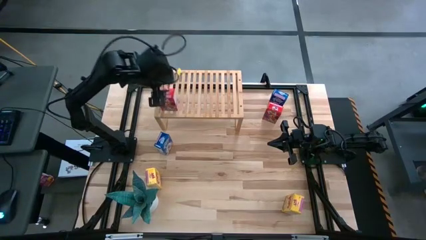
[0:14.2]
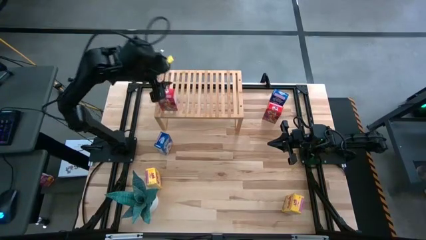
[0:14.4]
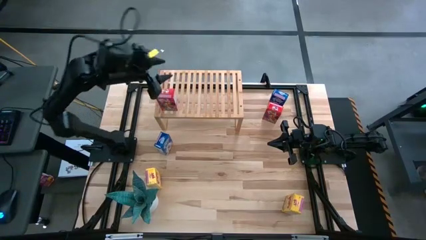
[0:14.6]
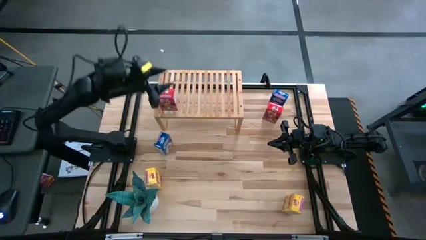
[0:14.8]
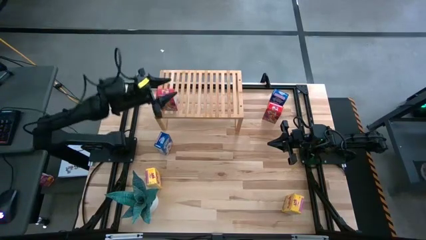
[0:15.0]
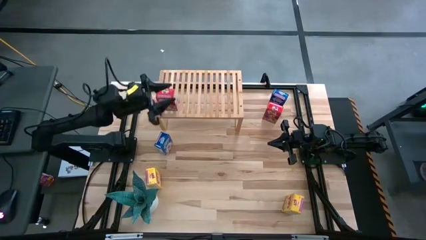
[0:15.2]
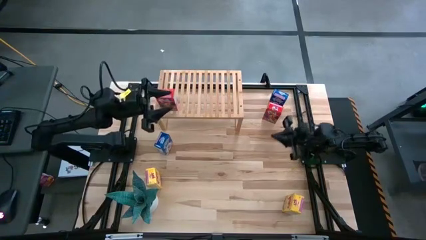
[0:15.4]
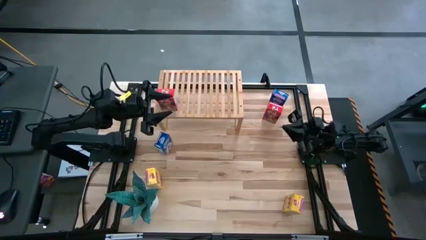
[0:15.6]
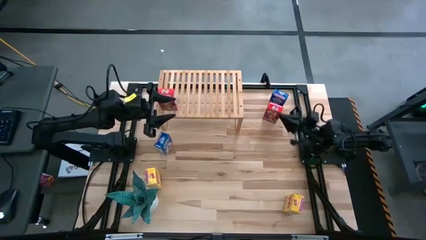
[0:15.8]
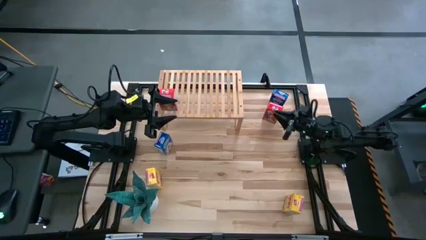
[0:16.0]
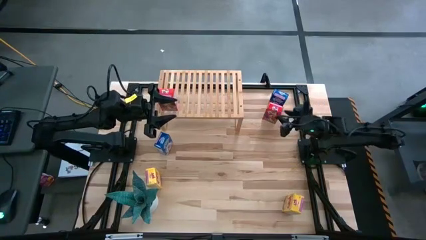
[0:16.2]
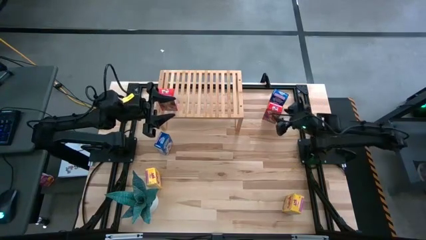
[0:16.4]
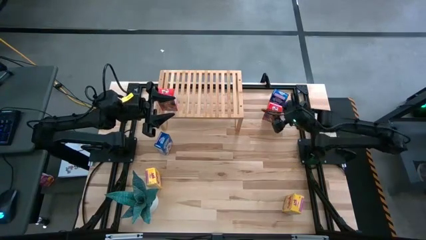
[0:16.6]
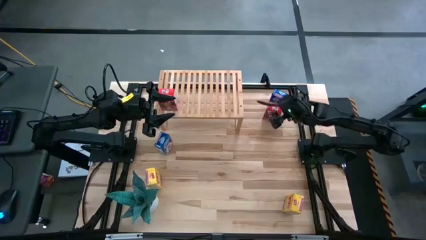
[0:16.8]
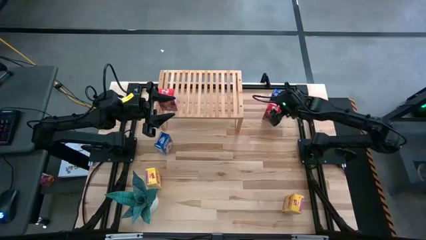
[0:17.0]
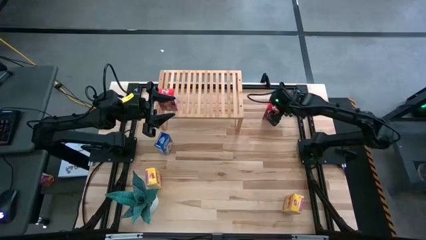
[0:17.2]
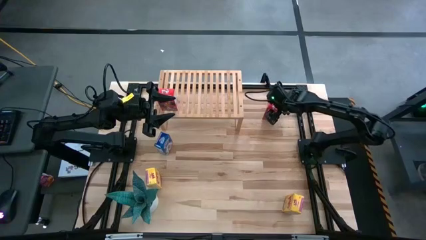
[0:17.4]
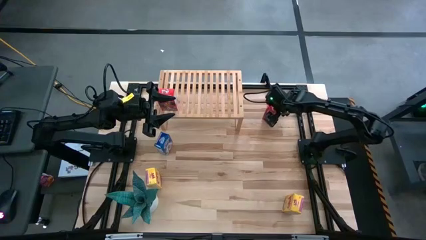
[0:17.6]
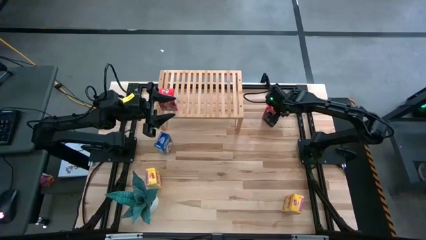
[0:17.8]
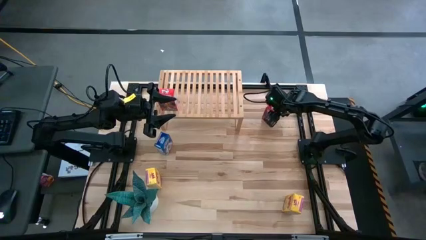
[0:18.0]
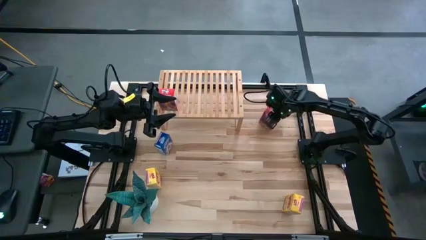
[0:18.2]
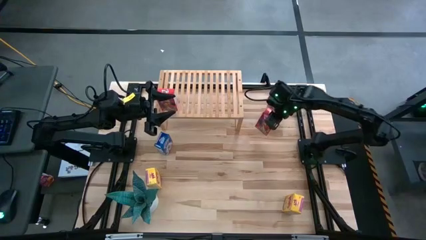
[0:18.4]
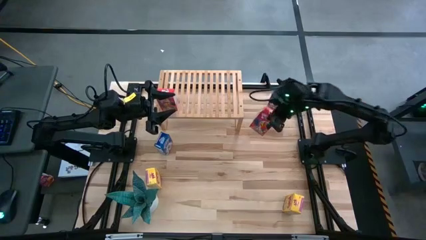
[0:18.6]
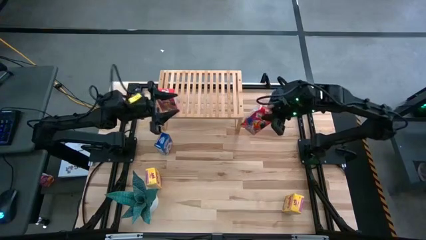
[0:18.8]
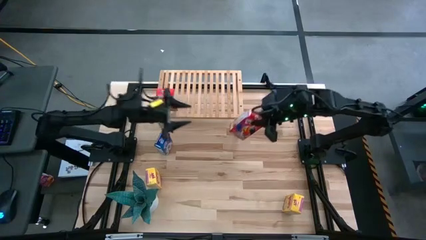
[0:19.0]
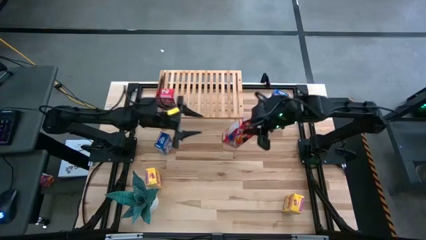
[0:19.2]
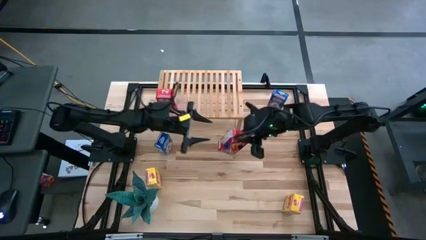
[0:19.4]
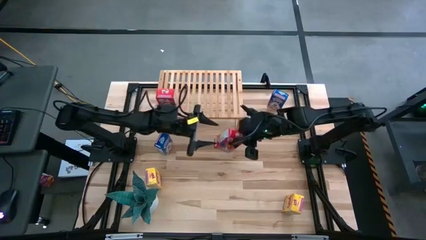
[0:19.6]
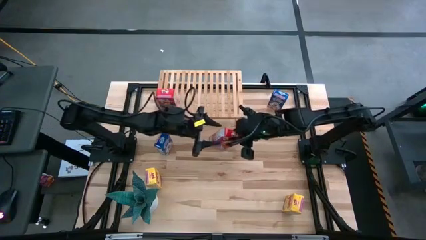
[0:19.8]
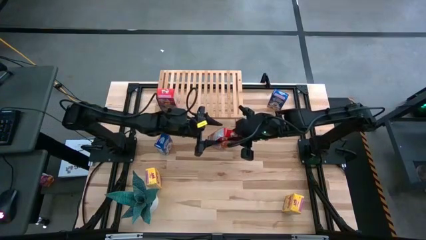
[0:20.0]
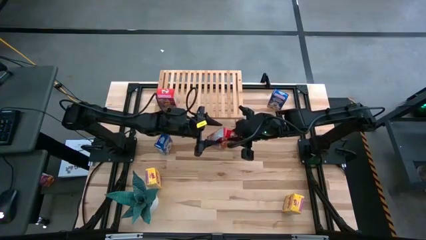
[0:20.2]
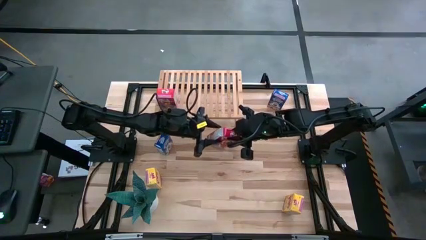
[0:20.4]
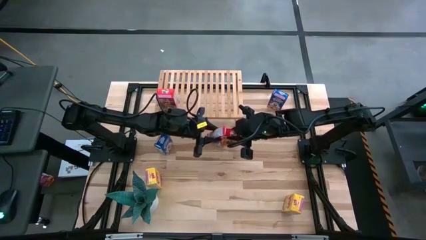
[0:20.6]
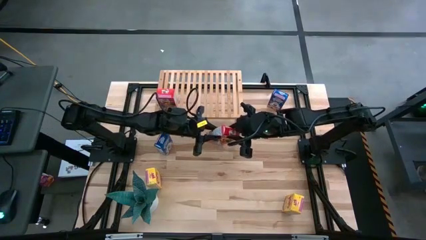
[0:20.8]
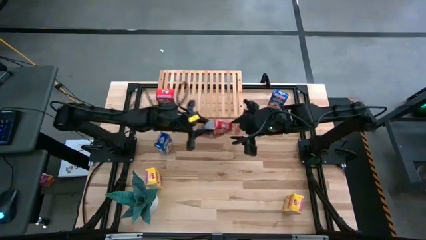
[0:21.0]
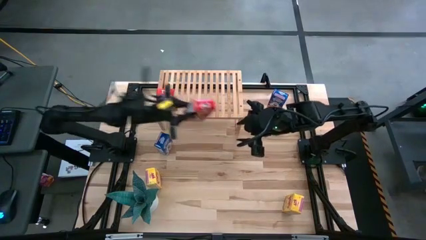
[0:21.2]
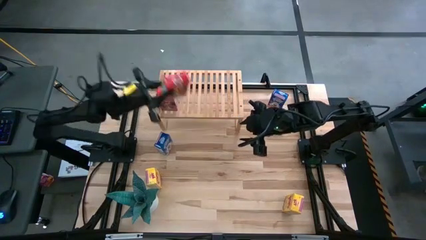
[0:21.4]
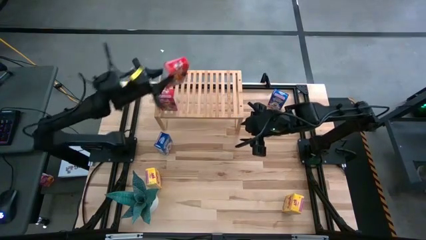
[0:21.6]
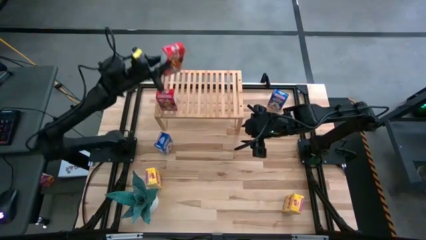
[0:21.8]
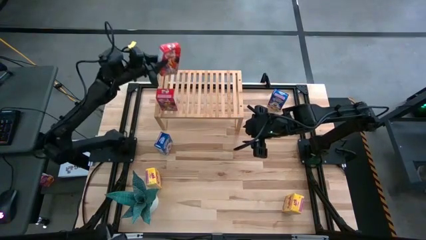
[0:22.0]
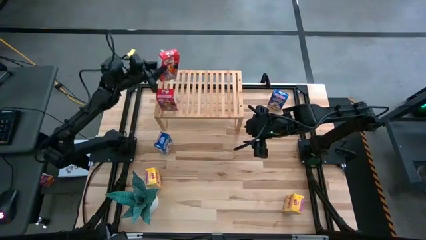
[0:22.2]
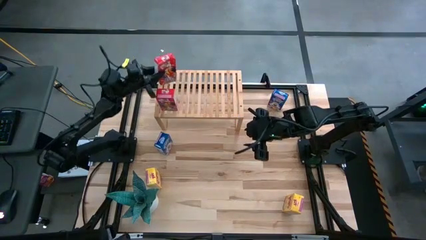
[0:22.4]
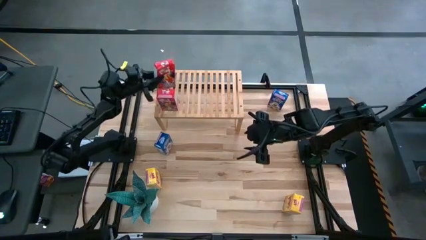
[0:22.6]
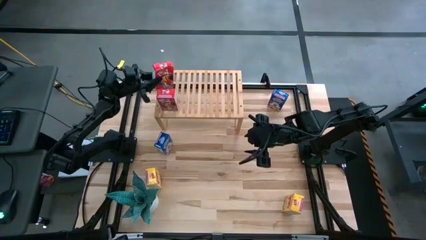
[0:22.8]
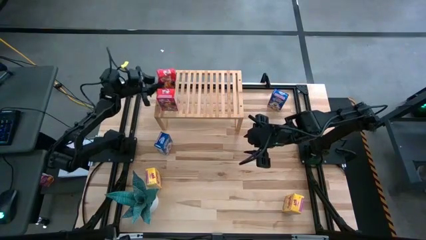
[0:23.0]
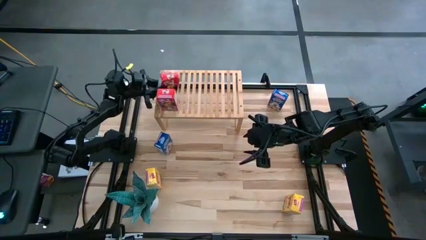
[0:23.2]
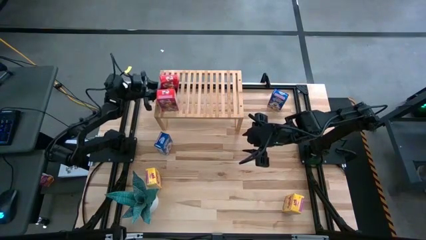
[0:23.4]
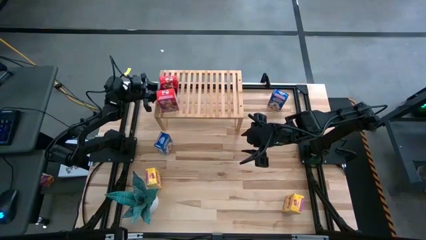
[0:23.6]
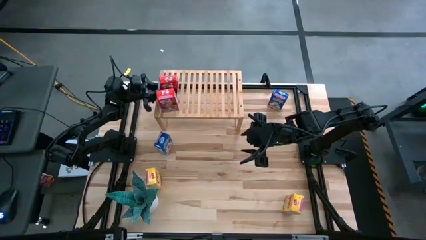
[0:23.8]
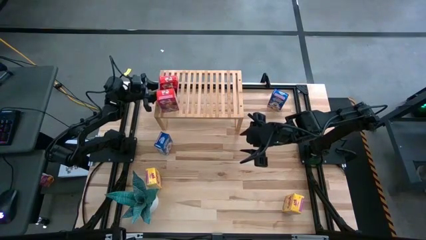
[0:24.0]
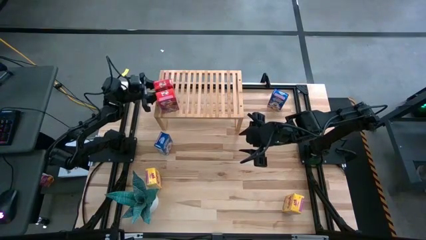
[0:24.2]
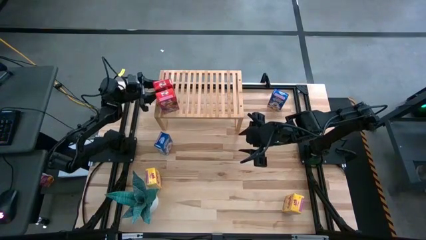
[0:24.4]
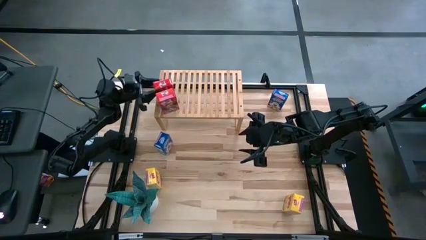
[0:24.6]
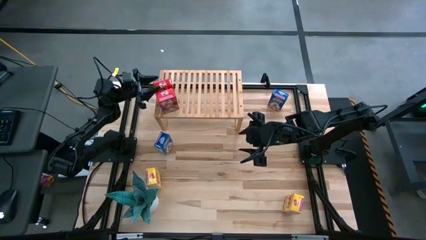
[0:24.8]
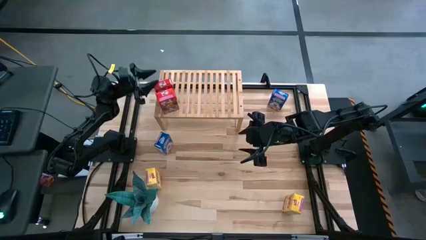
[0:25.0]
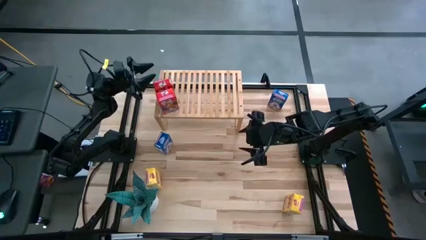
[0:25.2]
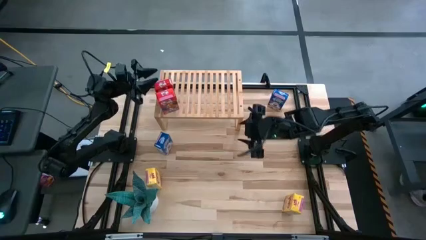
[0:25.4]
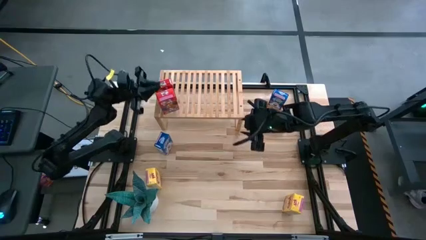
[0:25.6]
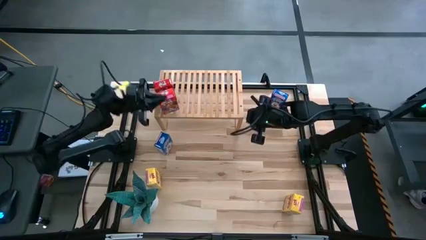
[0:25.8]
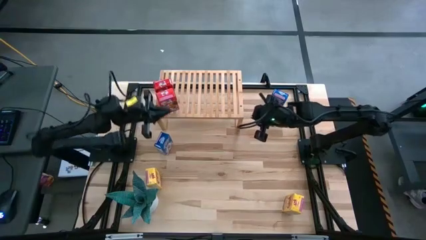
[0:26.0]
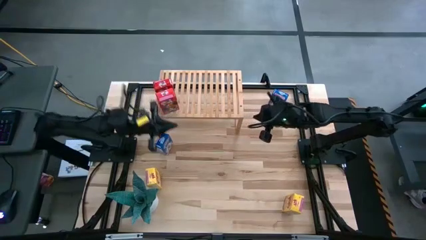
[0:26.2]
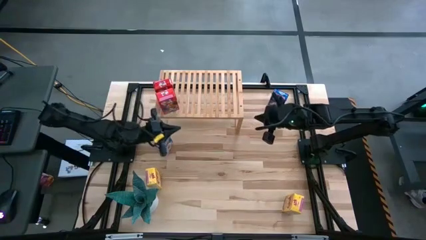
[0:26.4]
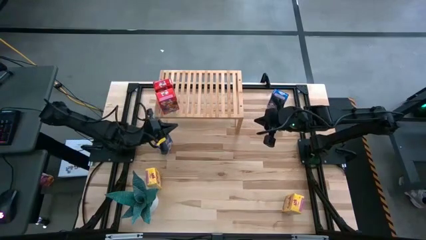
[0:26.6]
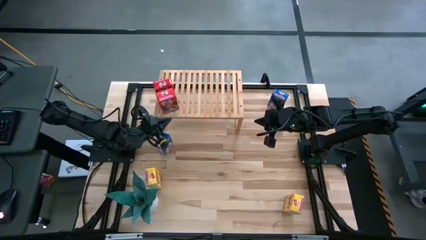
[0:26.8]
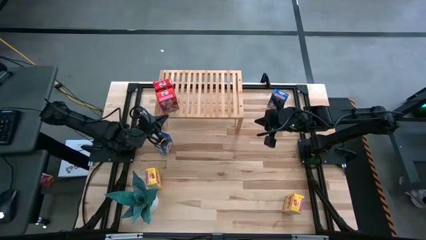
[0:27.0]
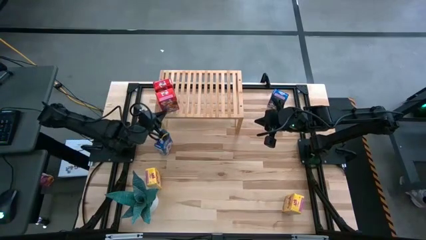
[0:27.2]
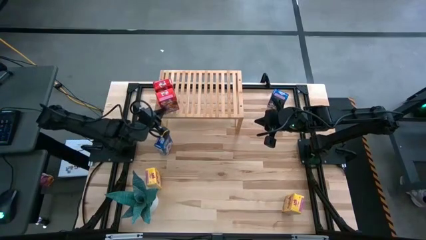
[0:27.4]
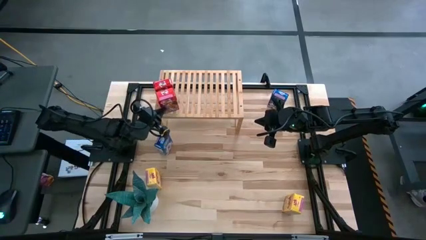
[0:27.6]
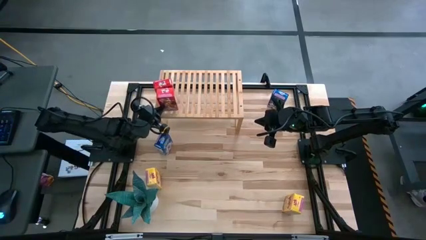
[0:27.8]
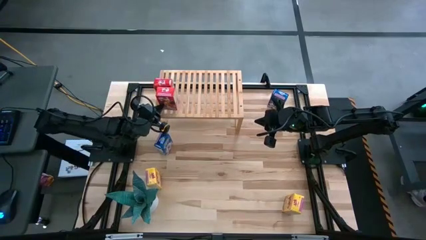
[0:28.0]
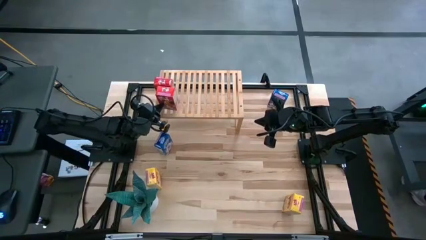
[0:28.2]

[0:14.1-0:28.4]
Task: Stack cereal on shelf
Put the red cereal box on the shelf aligned with the other red cereal box
